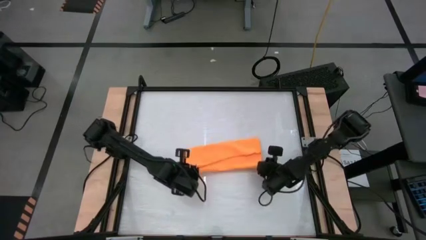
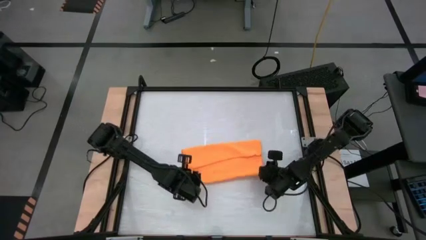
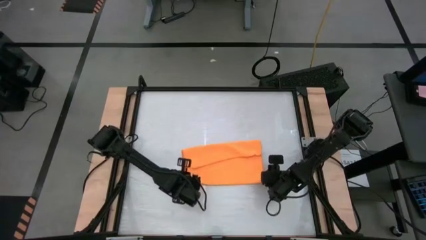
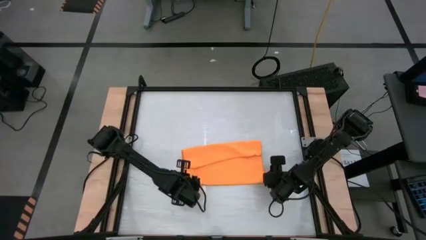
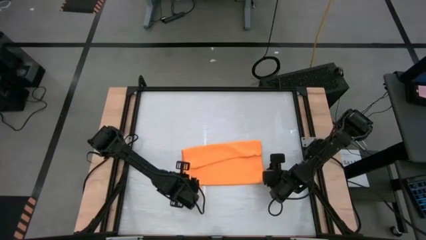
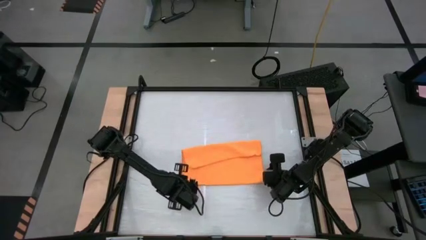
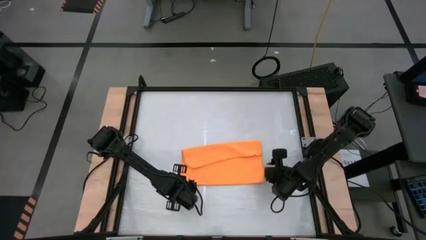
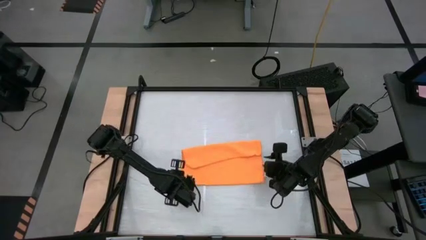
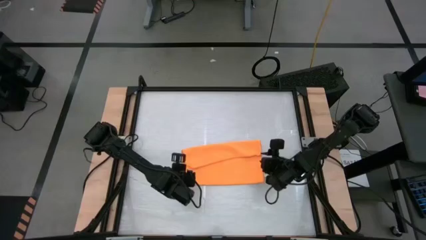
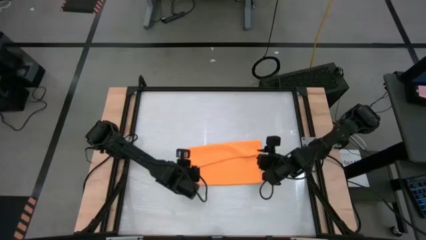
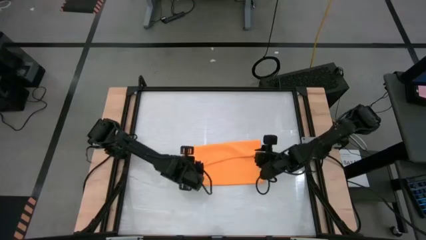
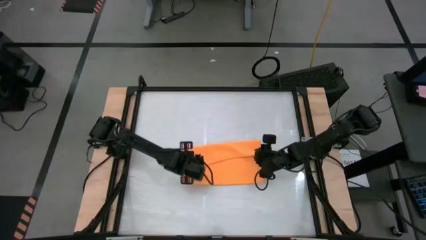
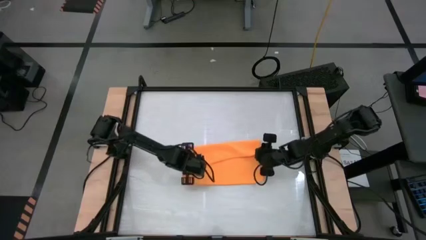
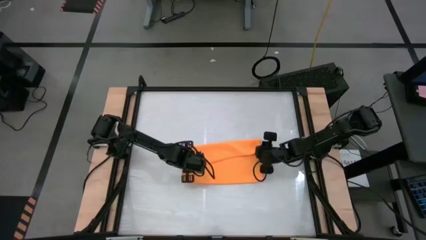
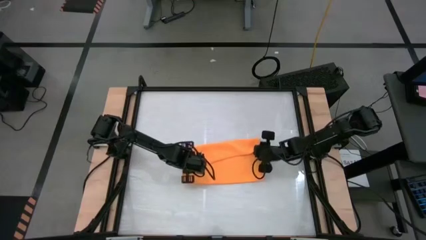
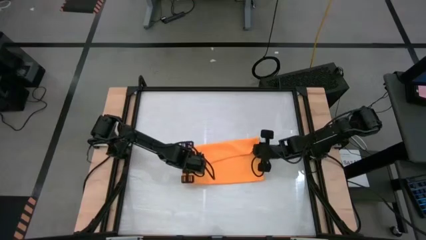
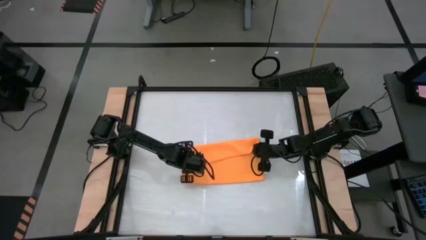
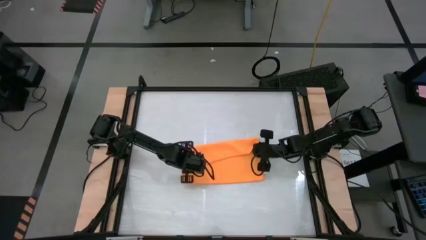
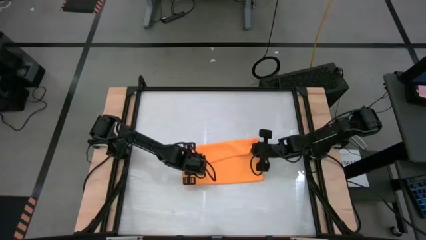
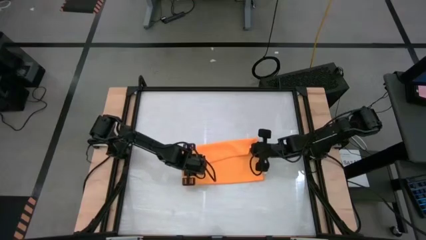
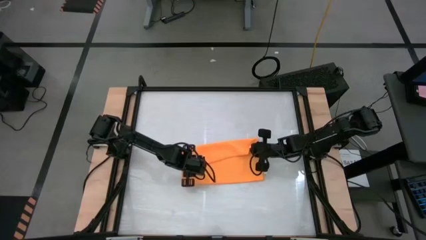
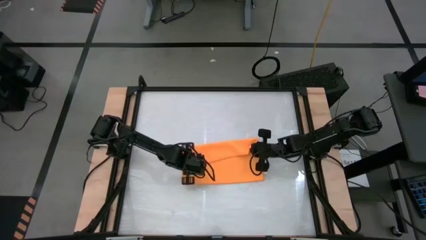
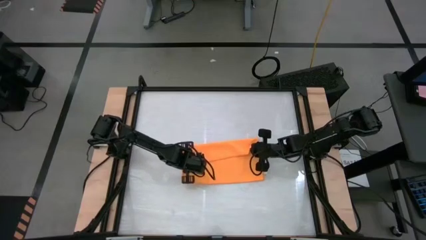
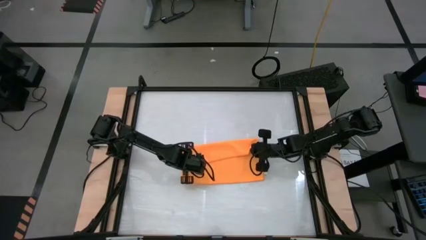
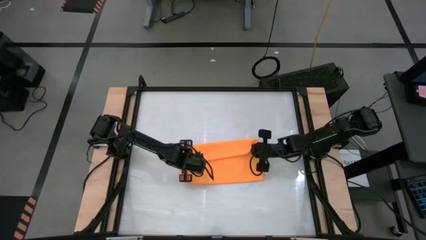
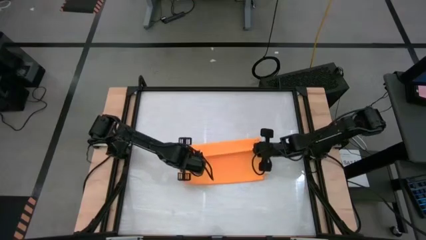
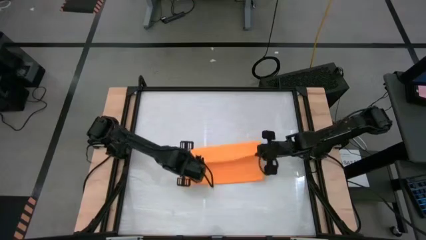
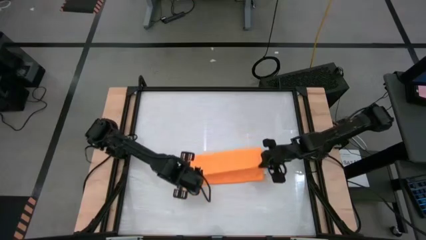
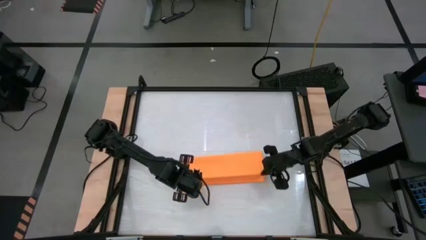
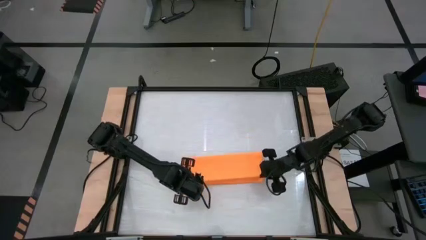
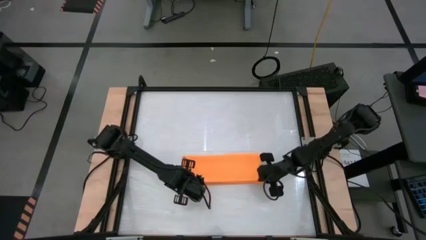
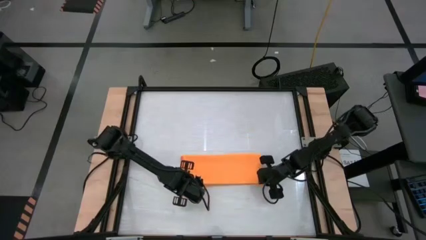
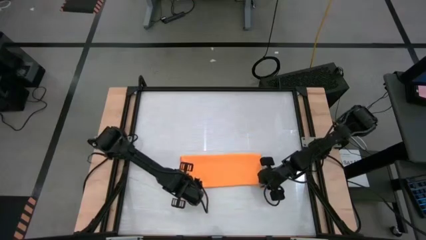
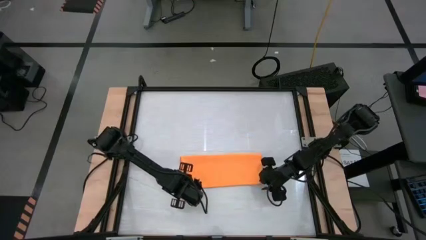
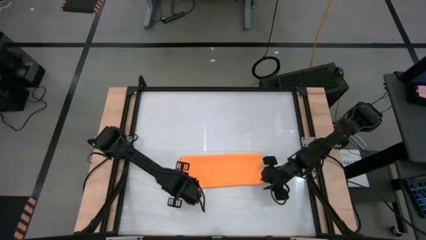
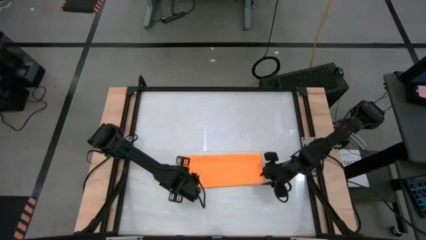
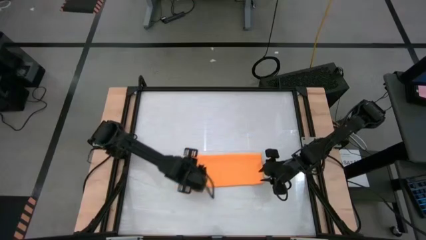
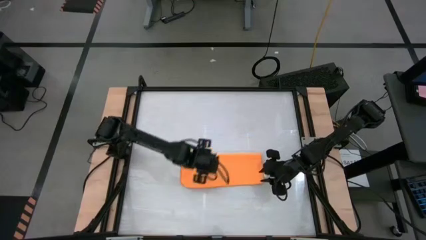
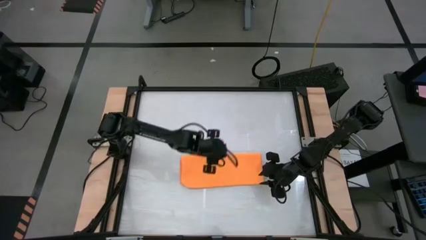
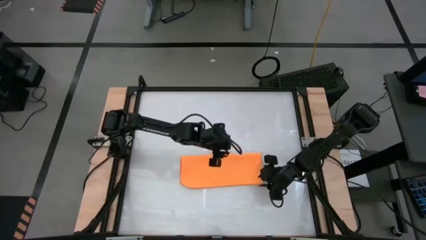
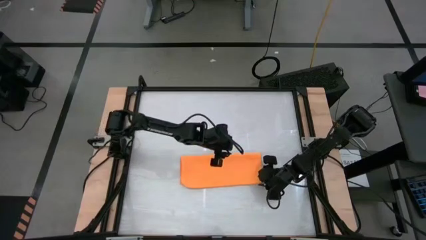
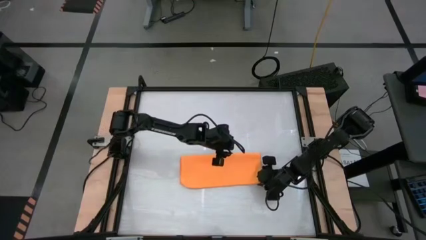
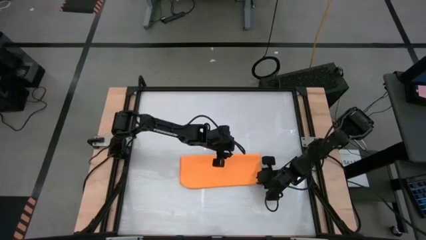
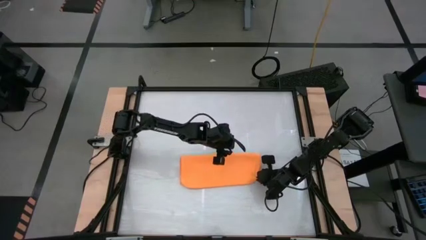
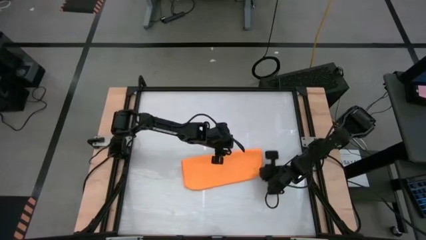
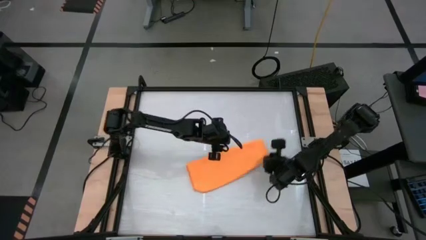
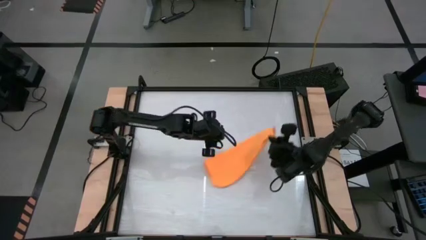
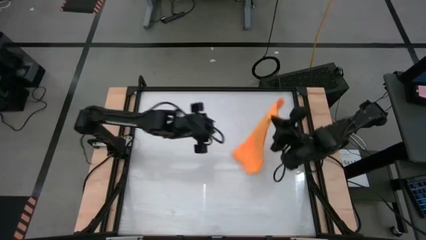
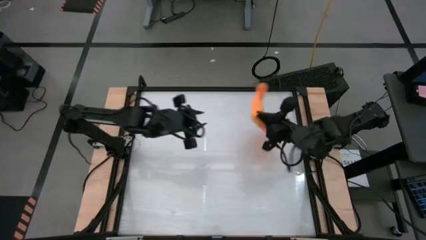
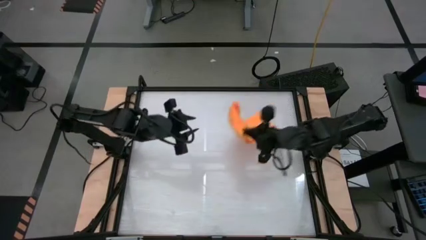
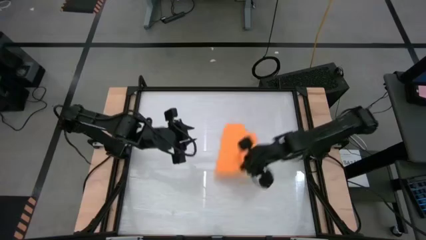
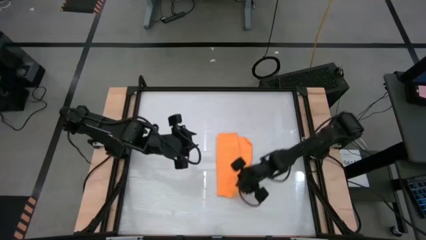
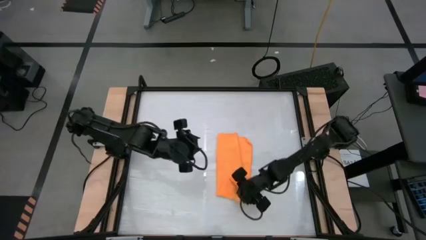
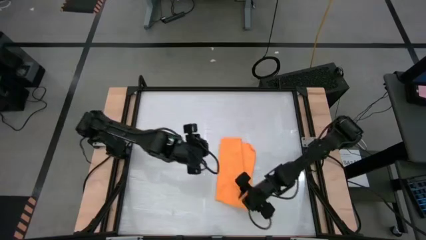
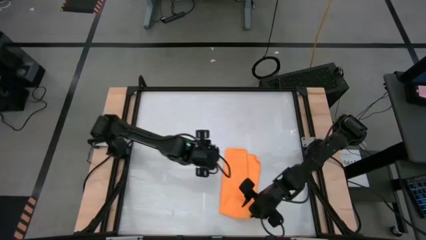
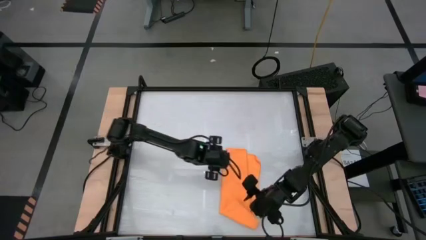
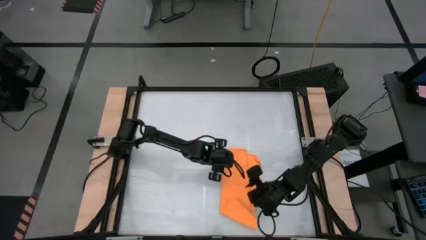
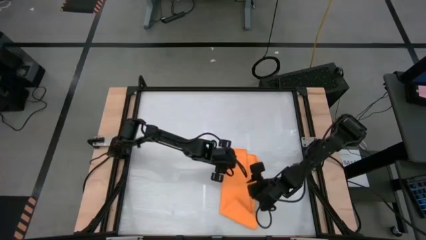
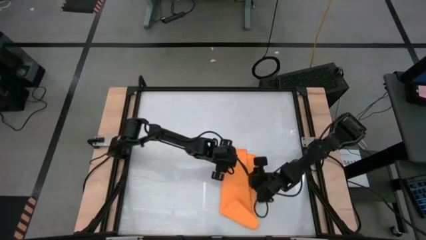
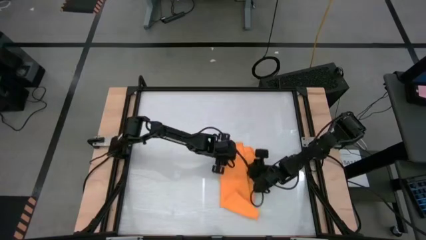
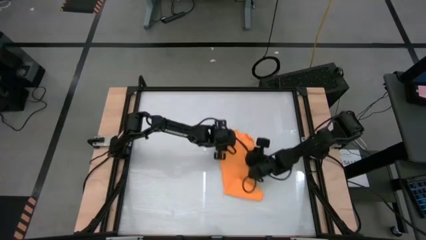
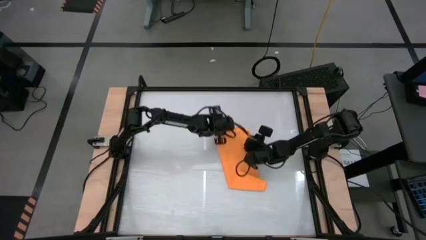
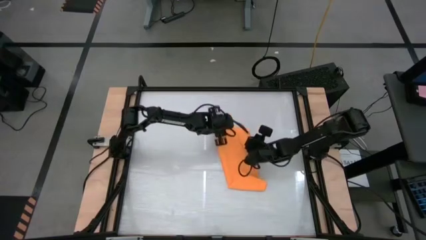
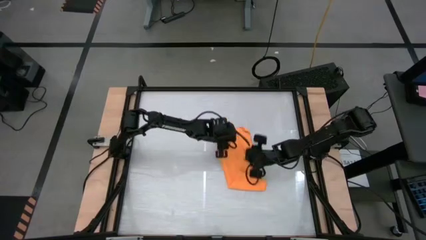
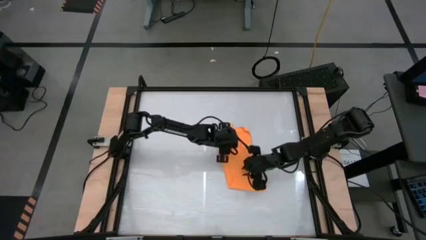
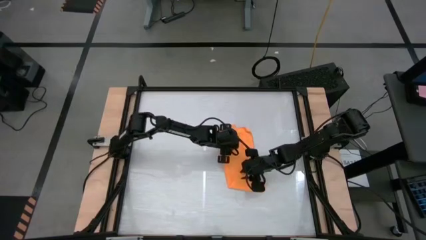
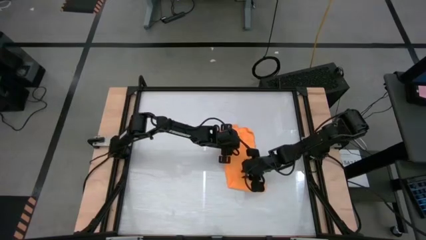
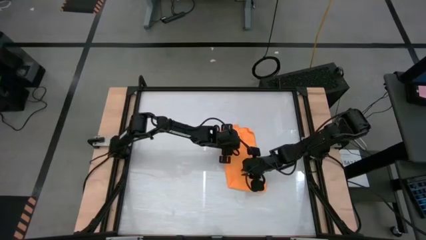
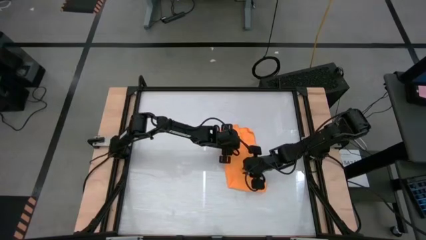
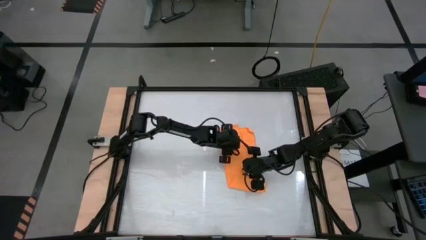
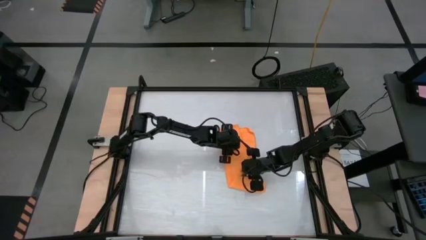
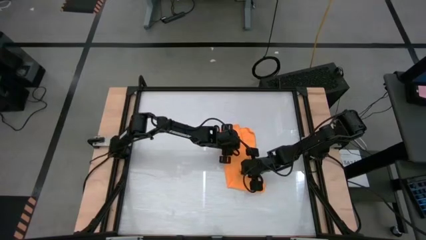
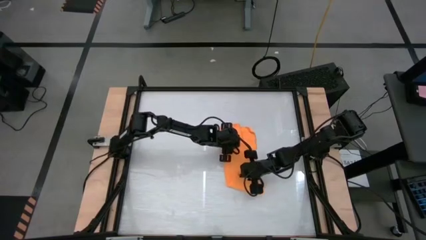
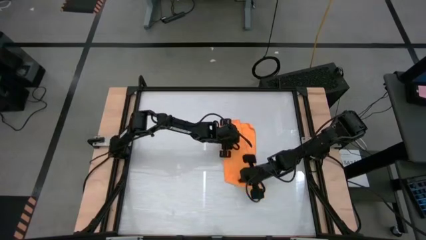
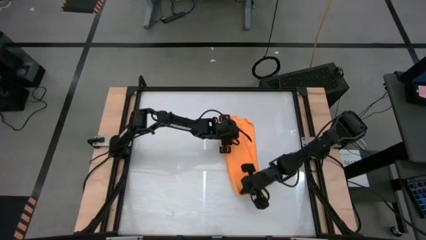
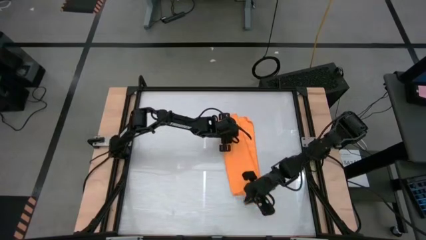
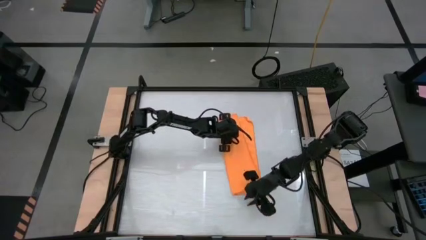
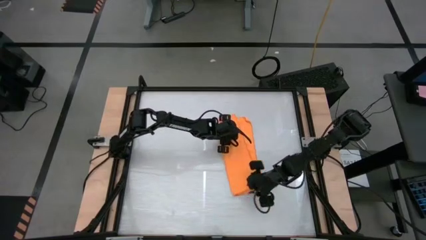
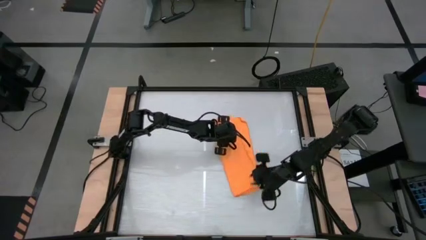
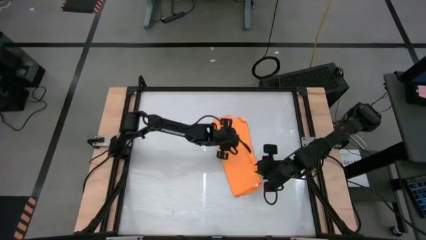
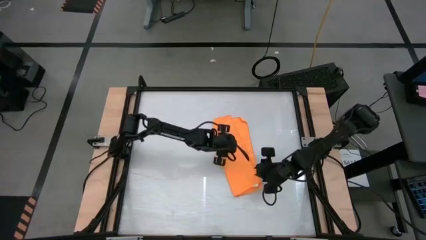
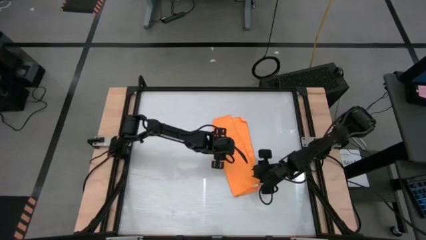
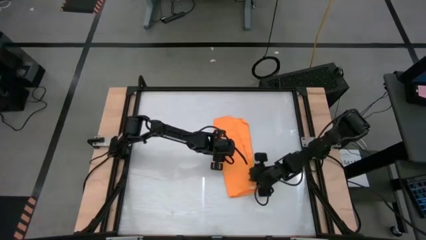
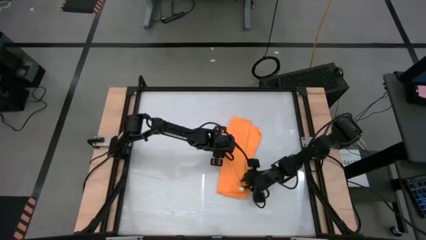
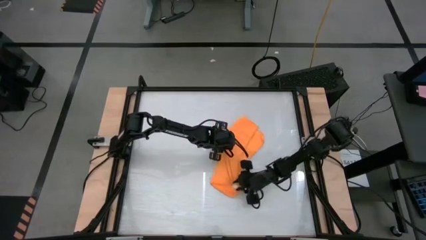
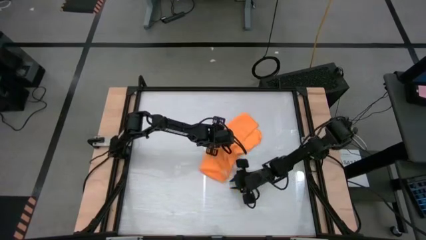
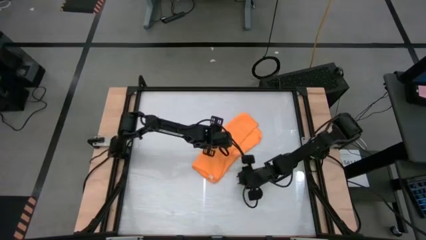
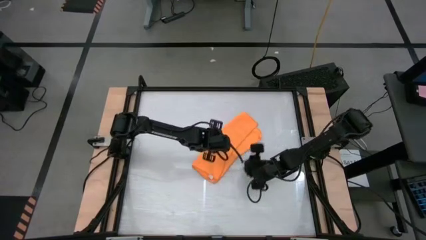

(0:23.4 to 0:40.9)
Task: Roll towel
Fold the orange towel
